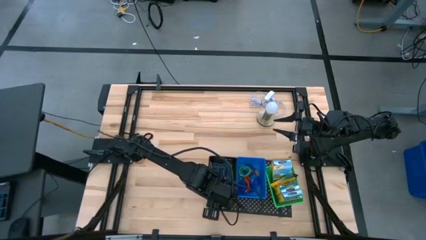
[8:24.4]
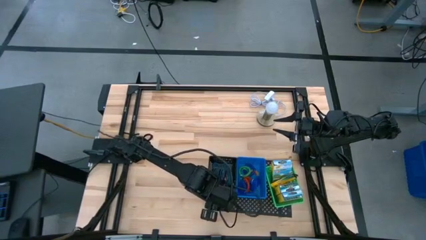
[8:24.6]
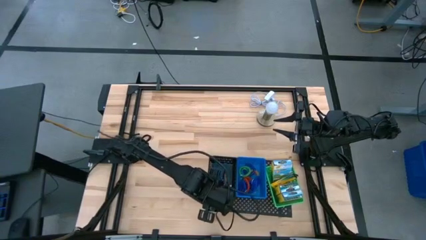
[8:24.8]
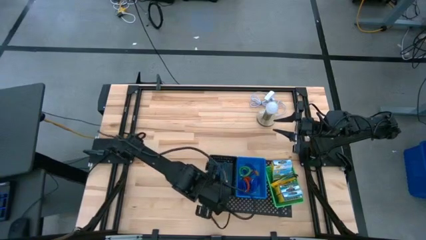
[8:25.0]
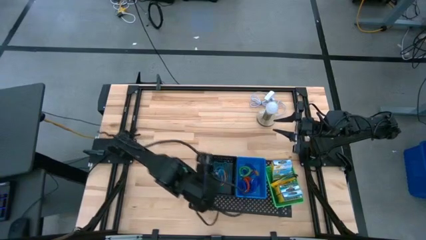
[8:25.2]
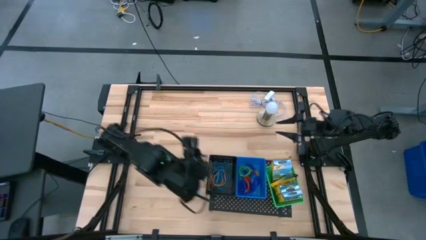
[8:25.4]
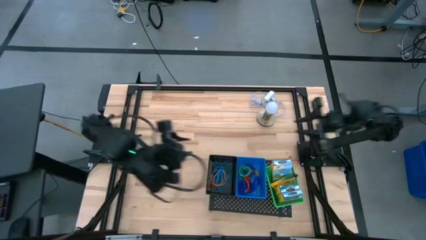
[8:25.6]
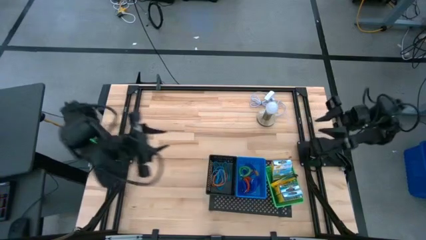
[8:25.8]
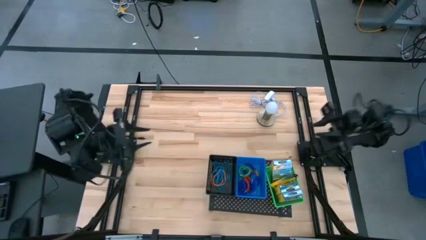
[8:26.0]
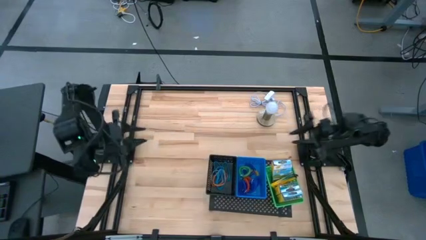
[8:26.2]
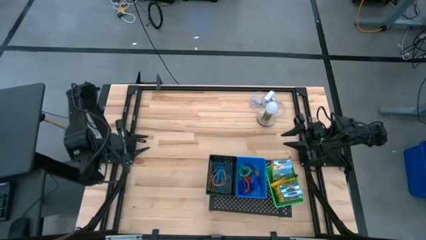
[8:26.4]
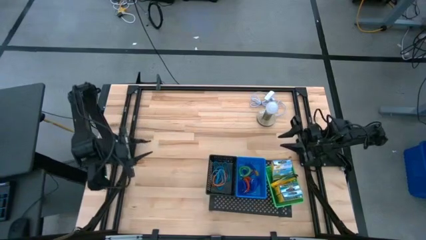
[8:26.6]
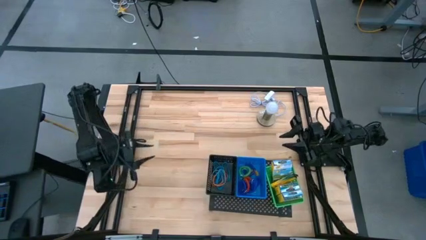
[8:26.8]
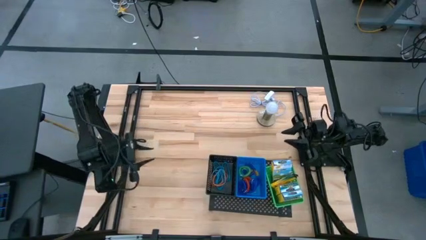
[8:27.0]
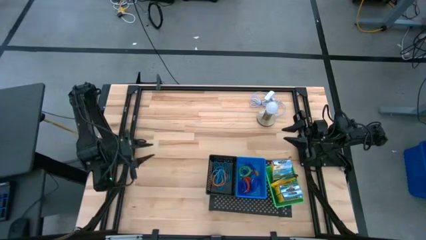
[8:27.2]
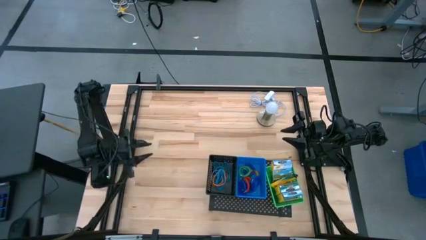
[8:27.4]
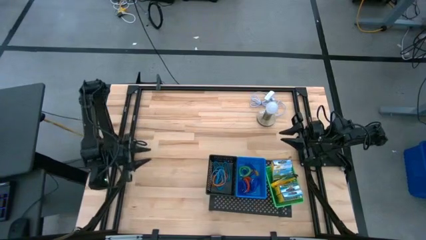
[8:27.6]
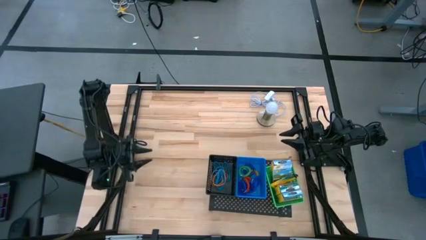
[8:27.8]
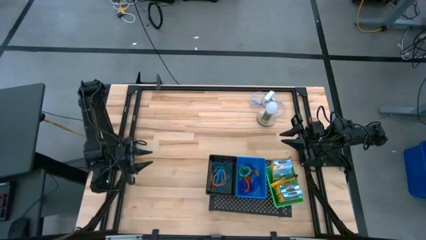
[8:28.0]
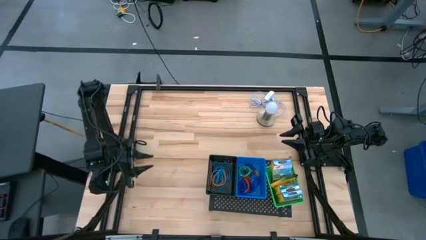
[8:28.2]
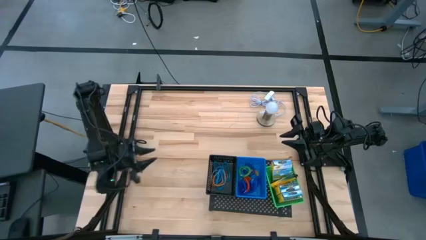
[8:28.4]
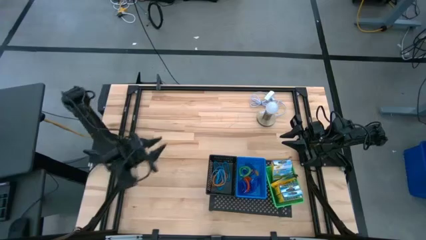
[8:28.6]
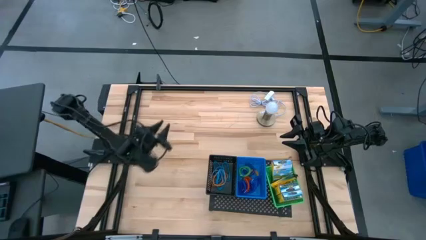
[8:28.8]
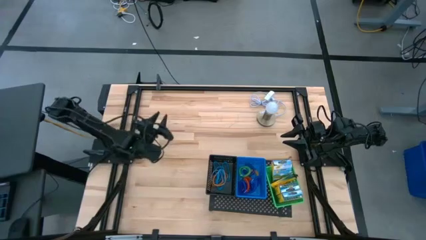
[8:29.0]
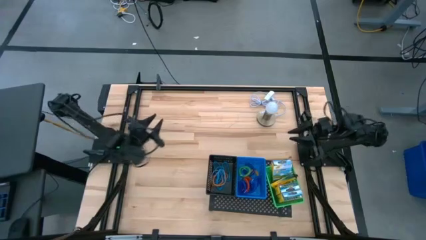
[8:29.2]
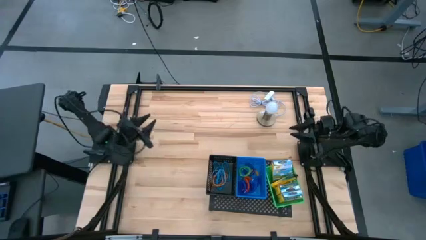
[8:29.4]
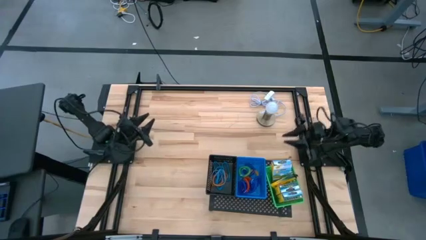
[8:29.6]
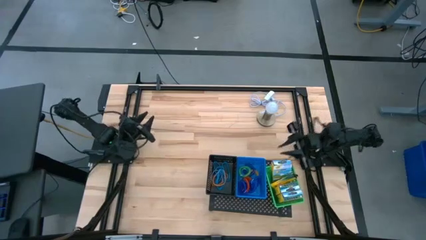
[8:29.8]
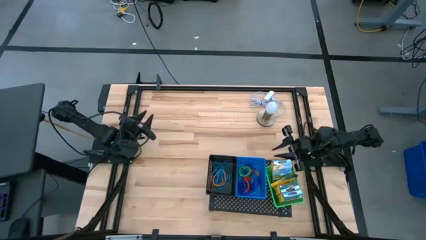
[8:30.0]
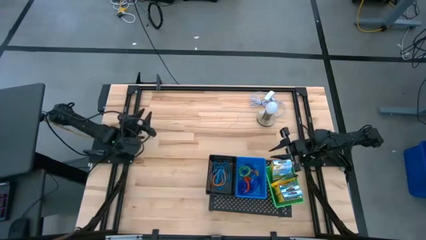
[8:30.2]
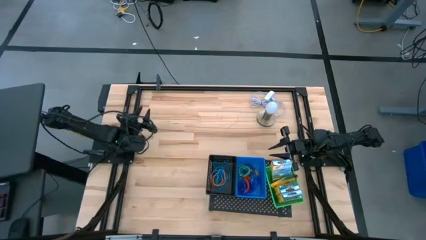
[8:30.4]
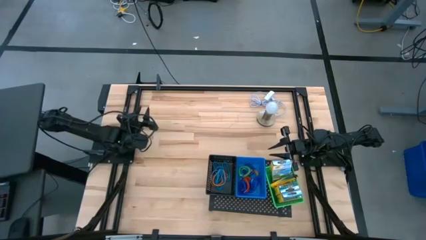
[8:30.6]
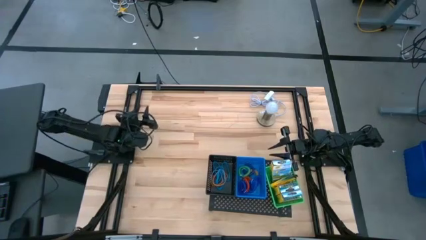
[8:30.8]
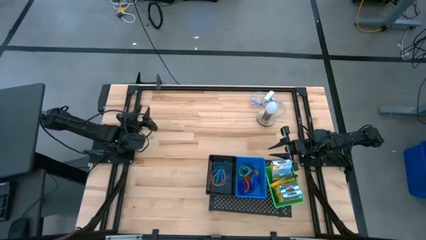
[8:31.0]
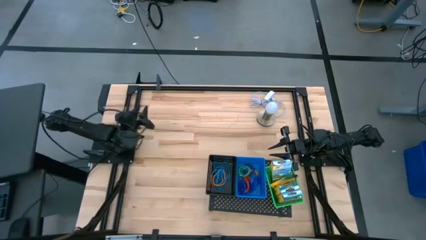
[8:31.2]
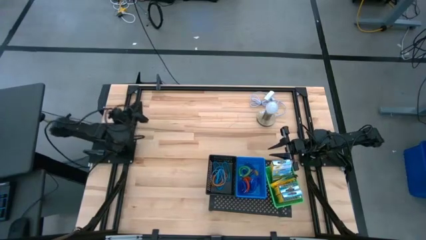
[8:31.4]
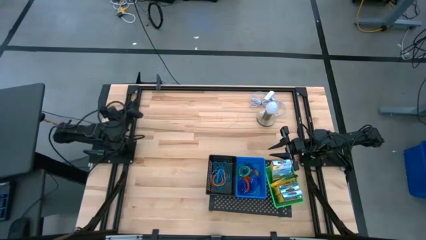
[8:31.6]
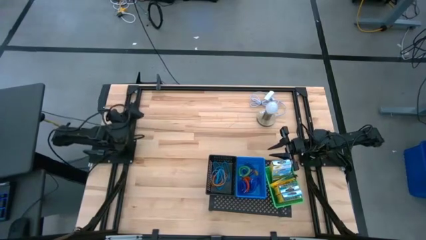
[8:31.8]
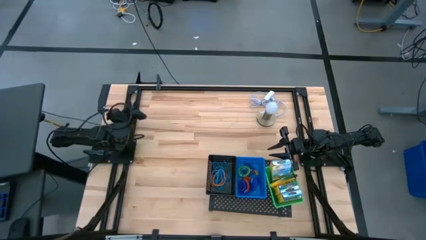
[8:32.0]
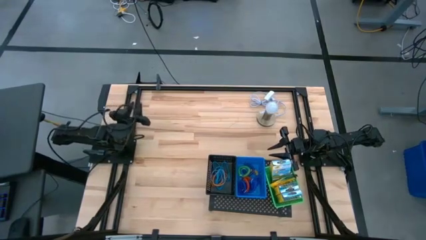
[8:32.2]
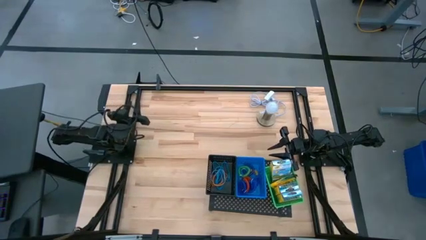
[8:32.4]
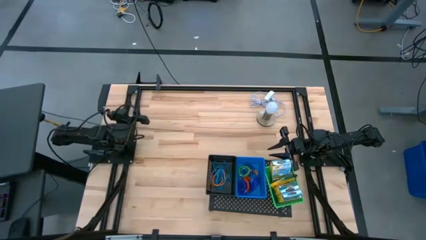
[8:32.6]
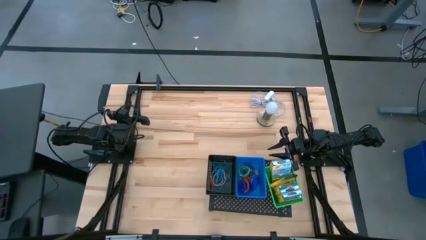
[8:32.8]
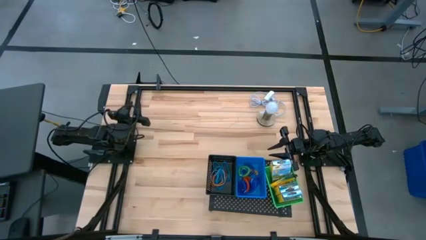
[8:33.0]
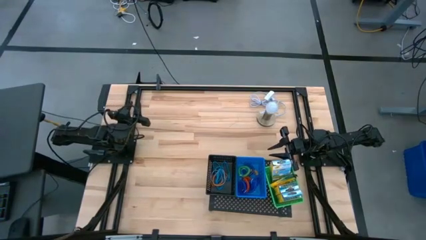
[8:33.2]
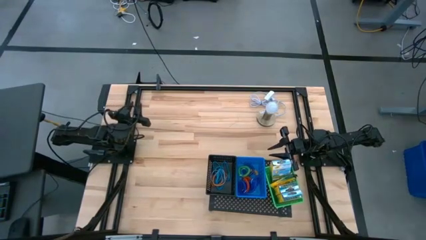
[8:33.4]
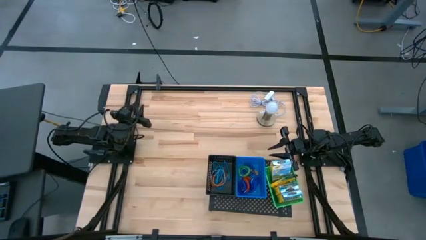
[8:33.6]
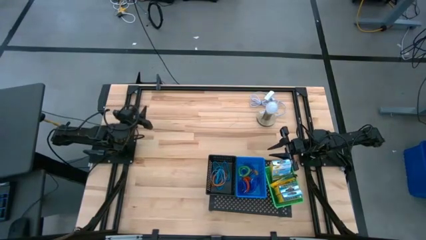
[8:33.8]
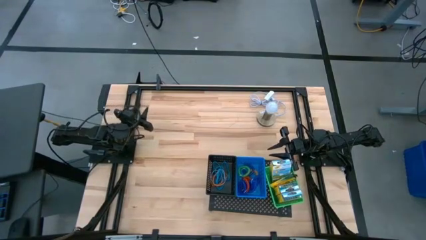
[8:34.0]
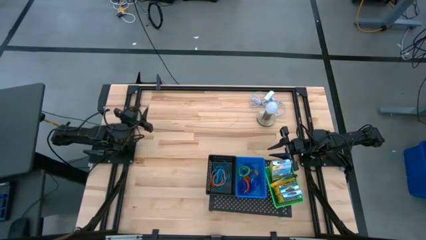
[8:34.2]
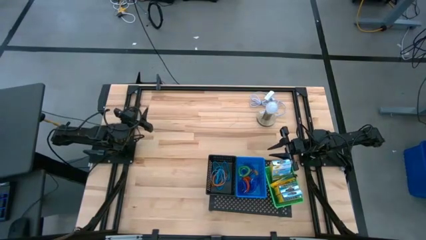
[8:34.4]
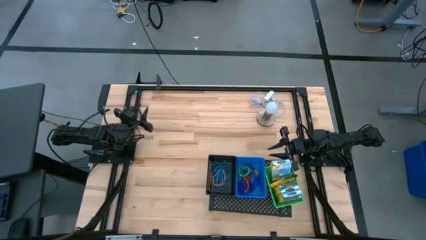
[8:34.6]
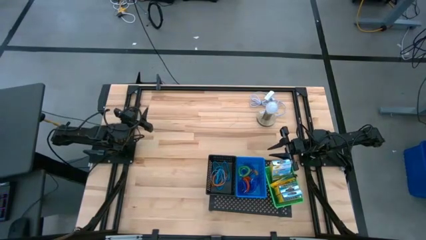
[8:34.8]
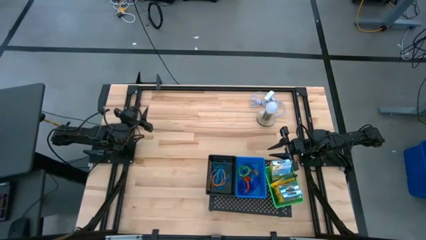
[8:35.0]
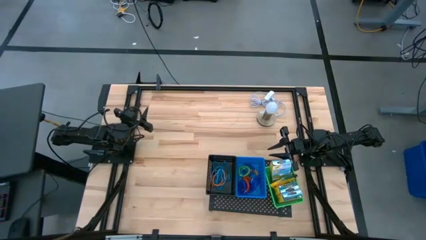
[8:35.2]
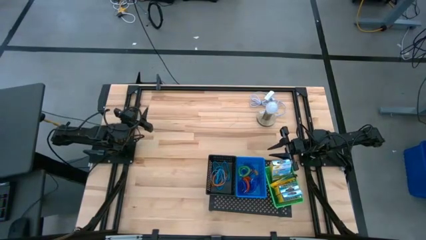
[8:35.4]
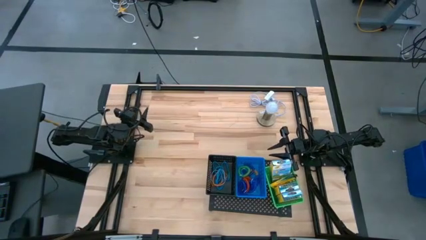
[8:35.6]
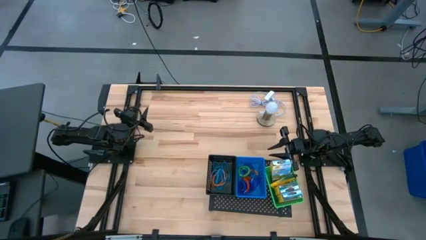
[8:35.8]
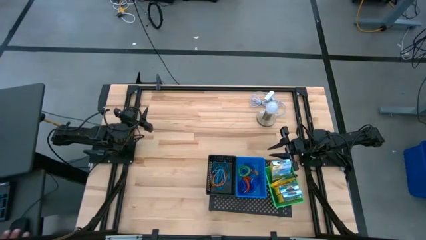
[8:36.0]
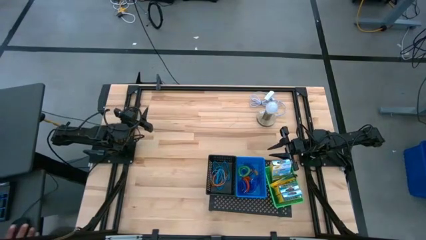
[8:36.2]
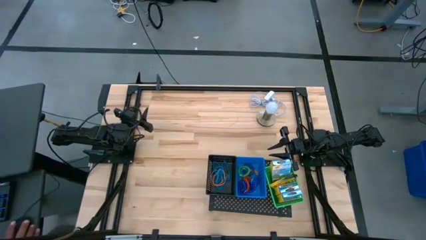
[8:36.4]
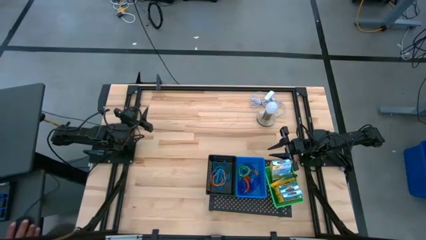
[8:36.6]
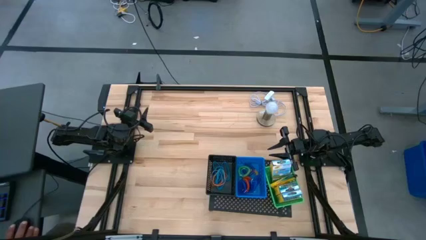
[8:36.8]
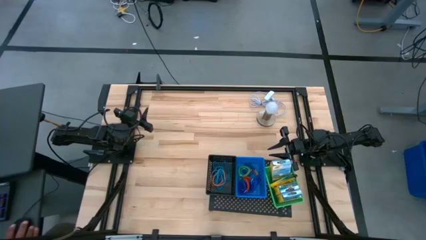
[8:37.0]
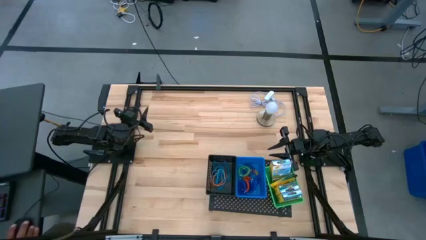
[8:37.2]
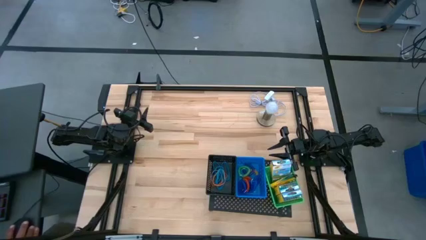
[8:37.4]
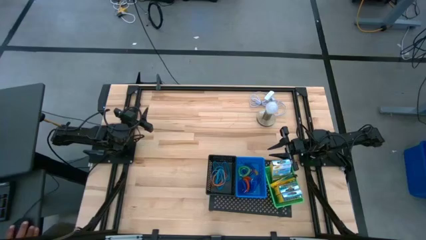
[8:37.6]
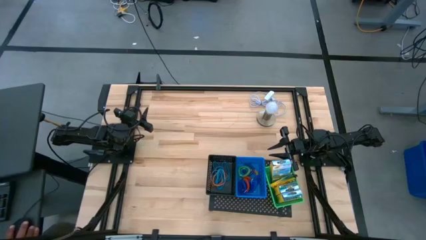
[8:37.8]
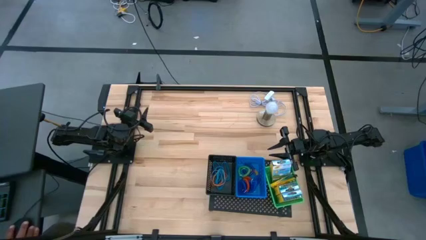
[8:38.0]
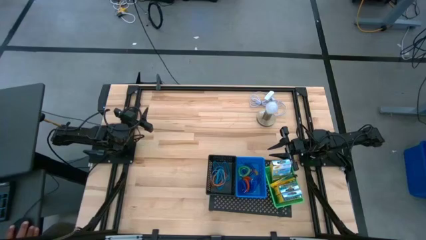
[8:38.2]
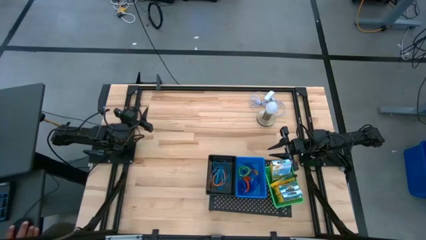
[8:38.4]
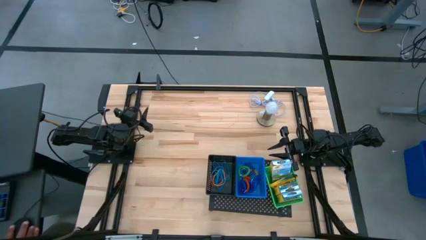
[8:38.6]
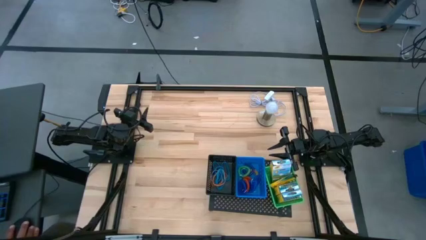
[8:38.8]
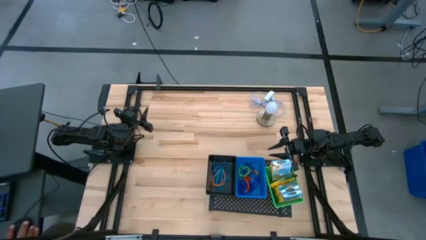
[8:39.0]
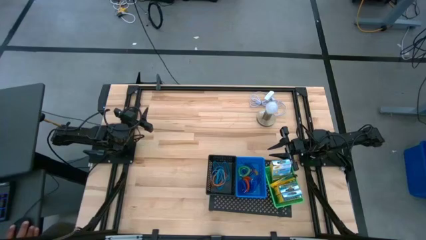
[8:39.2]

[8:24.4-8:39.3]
Task: Pick & Place Office Desk Supplies
Return to Home Position

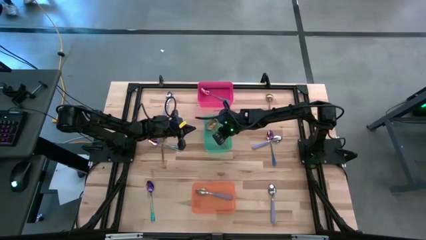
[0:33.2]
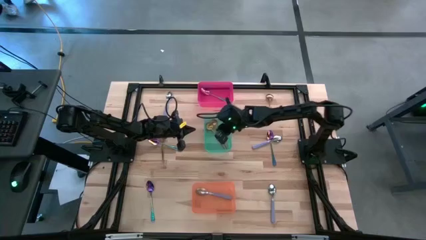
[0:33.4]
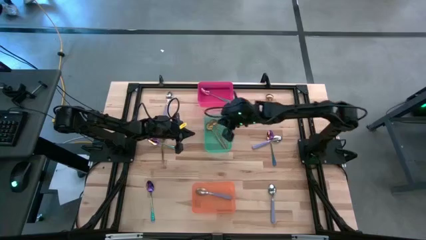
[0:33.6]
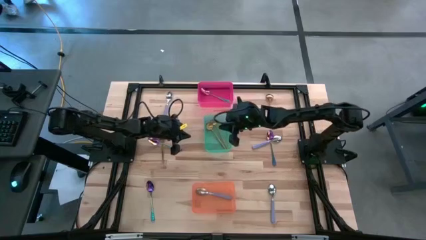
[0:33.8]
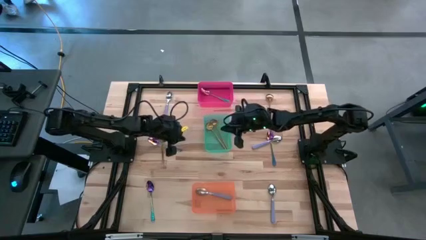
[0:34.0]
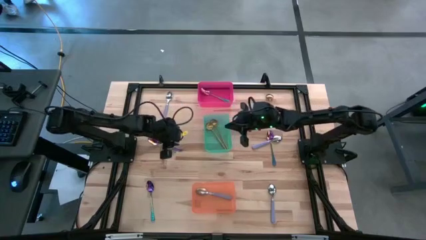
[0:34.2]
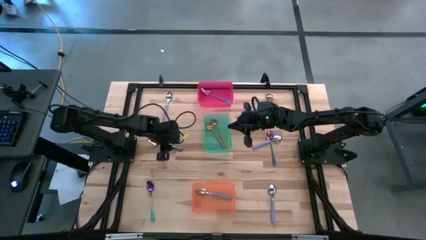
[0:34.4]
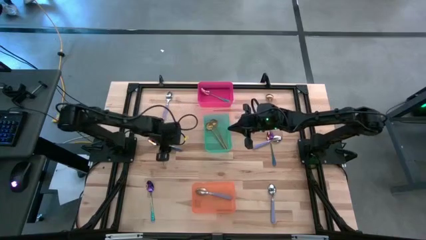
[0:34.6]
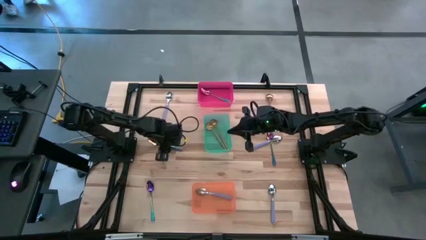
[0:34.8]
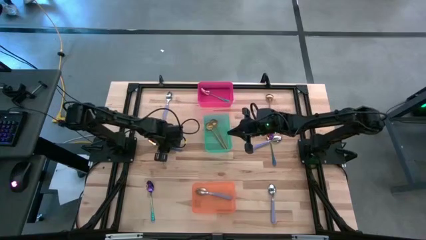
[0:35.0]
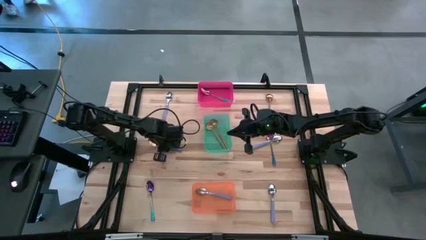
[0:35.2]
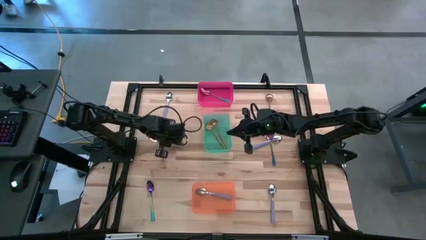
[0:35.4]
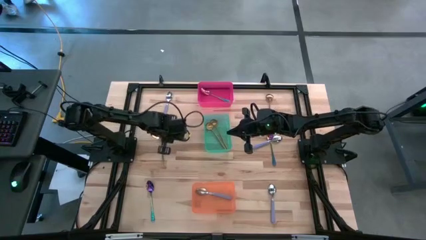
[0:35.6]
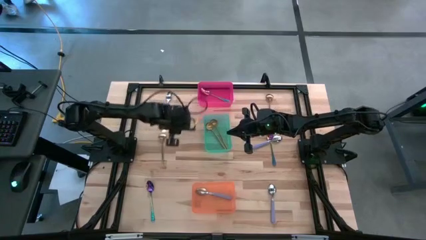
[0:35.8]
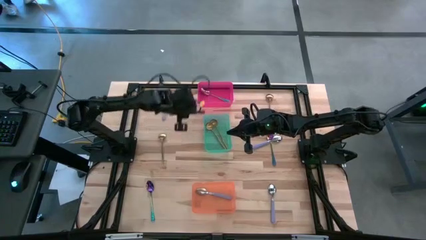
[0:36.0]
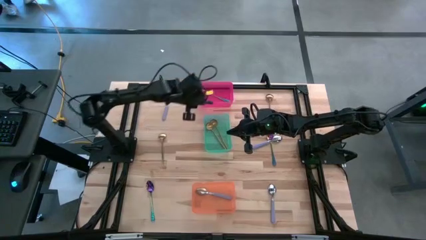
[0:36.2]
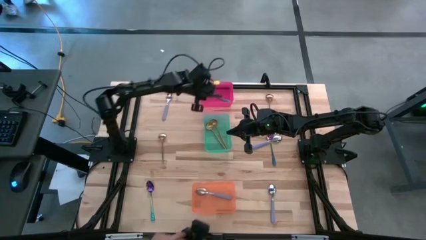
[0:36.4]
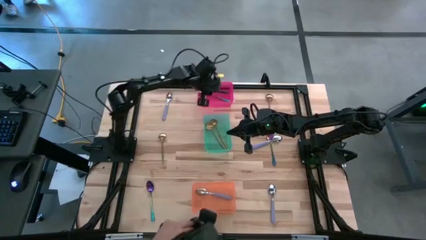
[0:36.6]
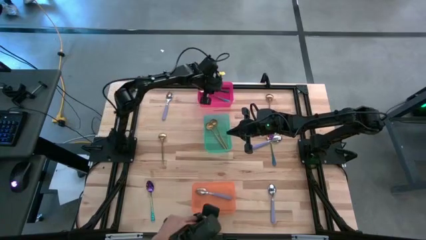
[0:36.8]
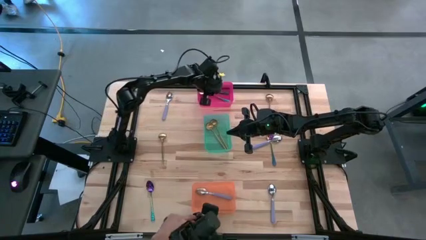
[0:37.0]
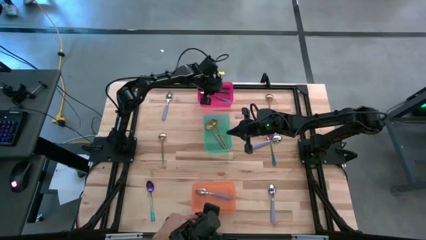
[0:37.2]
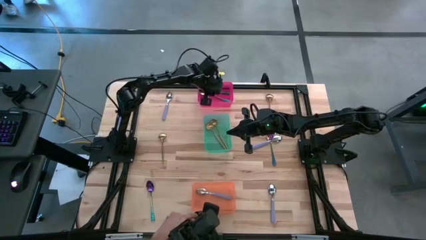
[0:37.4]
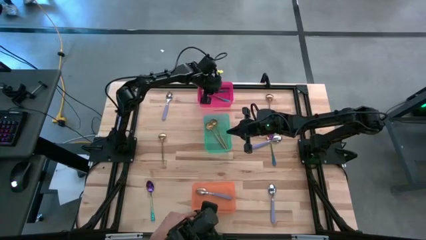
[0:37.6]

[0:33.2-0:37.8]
Task: Sort silverware by color (type)
Put the blue spoon into the red bin
